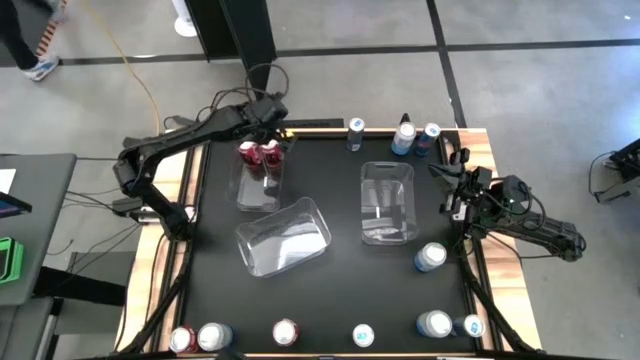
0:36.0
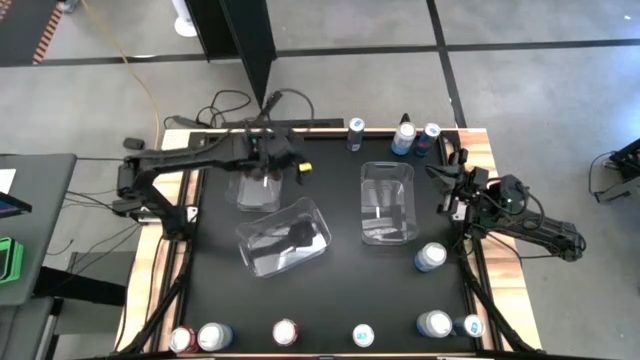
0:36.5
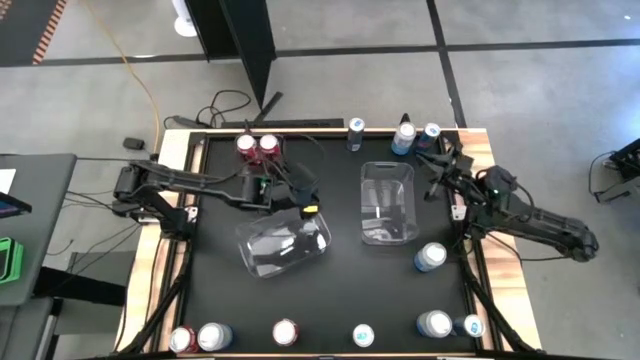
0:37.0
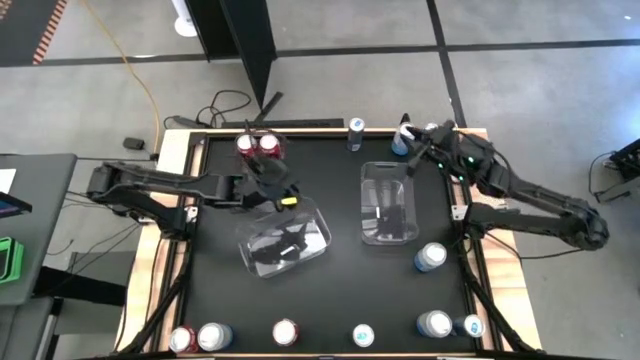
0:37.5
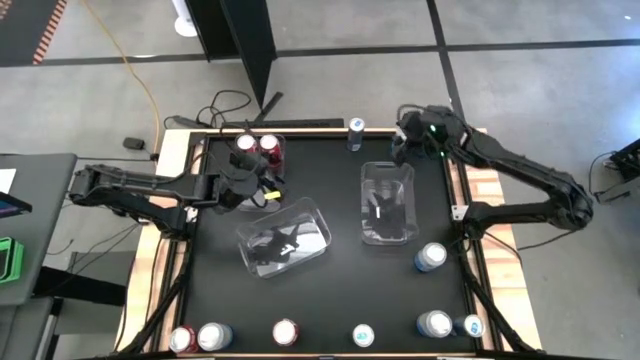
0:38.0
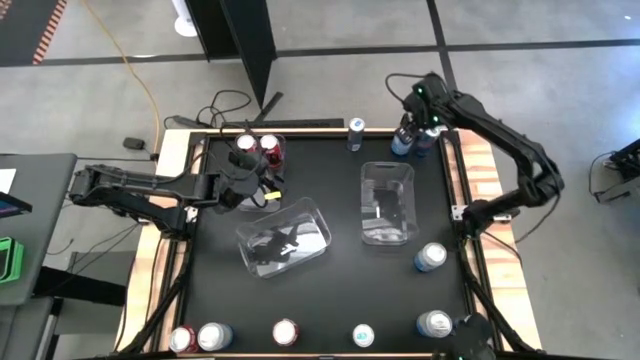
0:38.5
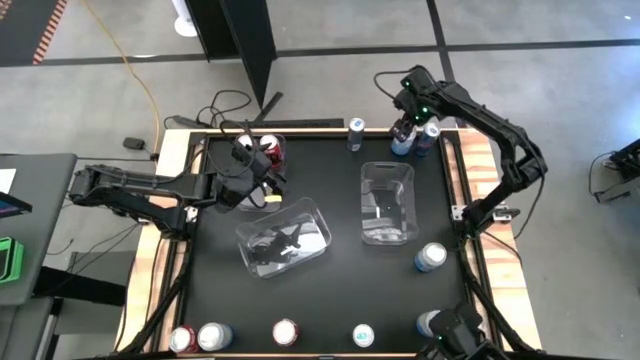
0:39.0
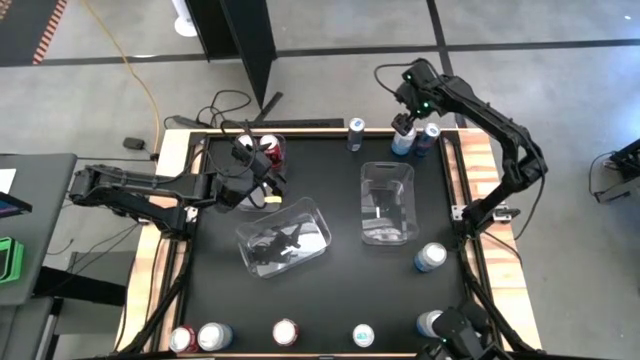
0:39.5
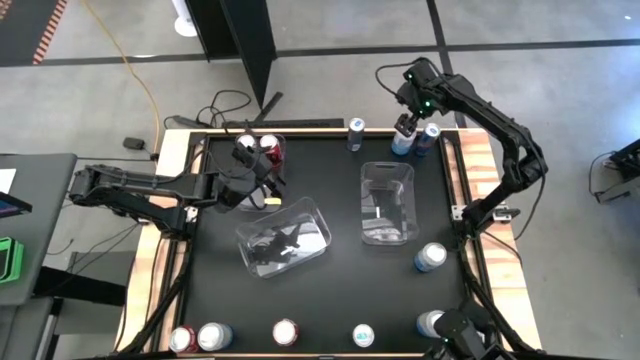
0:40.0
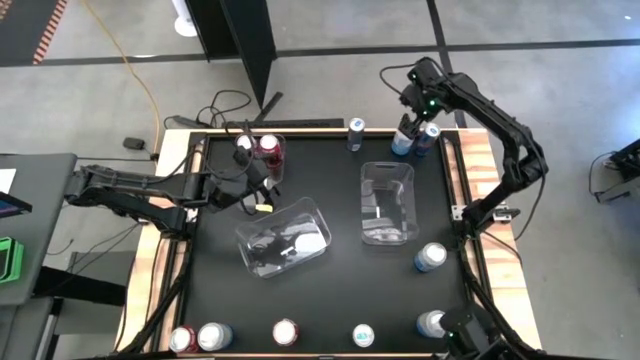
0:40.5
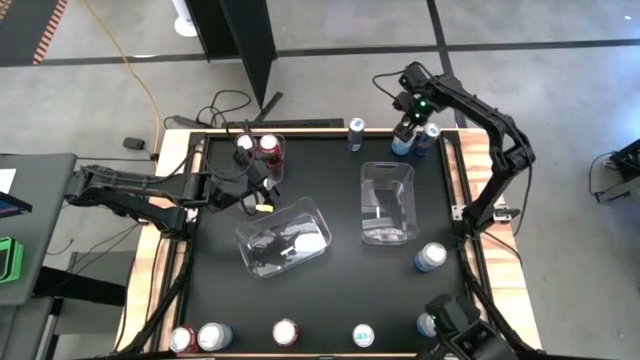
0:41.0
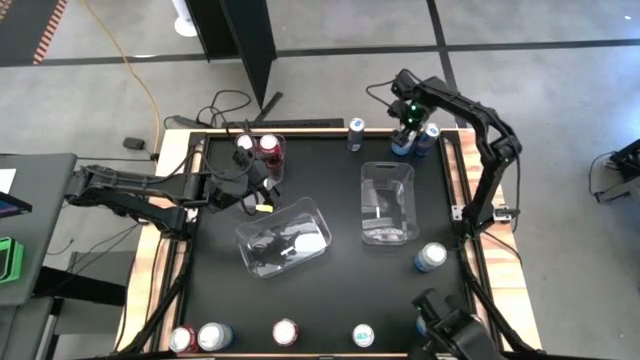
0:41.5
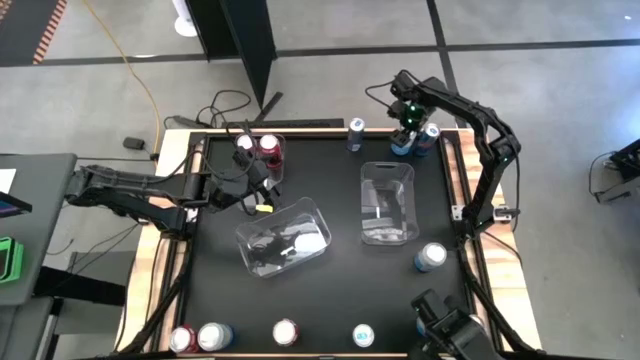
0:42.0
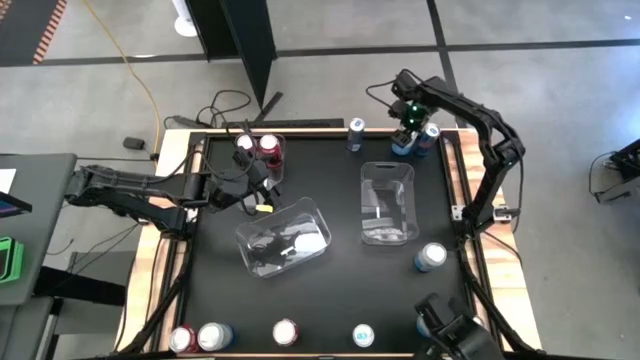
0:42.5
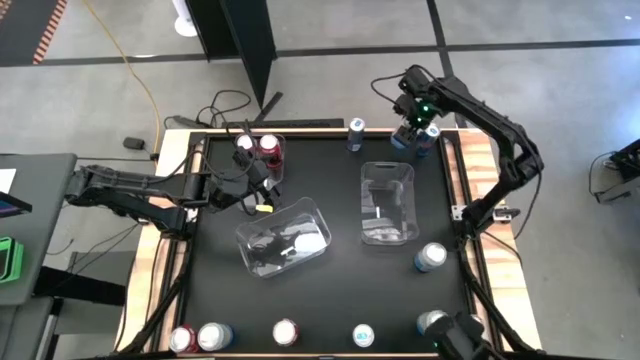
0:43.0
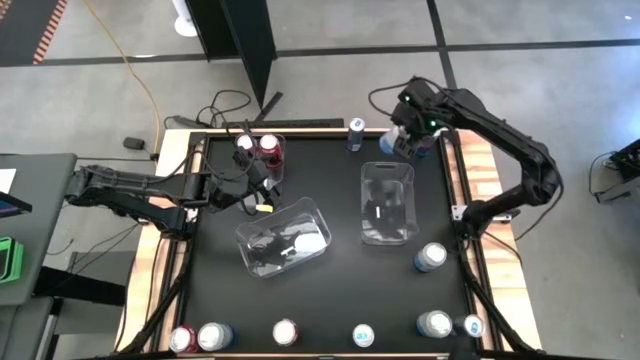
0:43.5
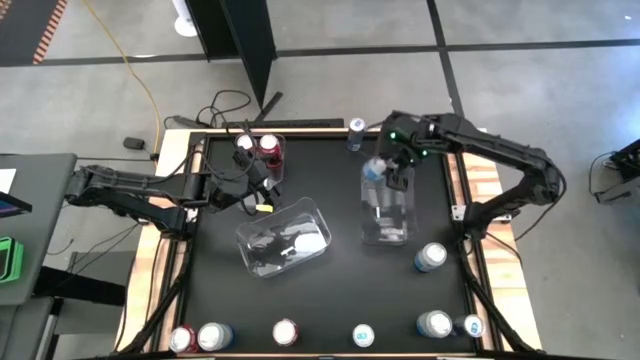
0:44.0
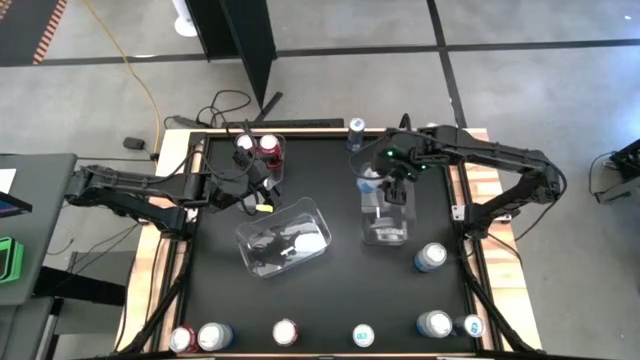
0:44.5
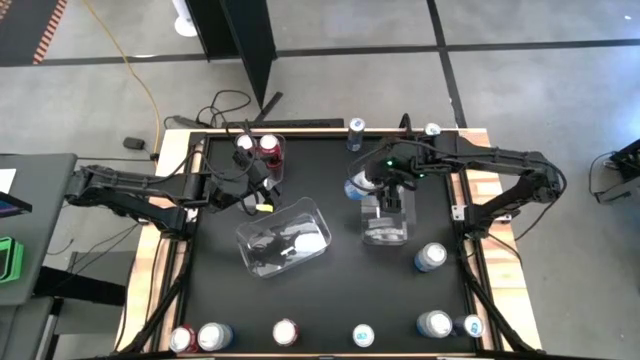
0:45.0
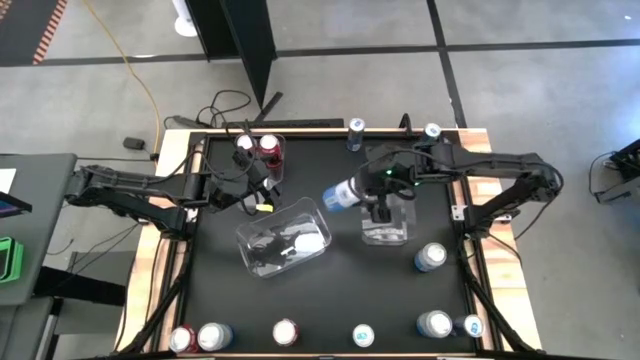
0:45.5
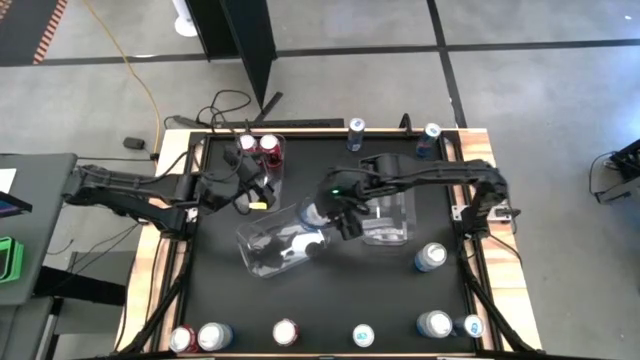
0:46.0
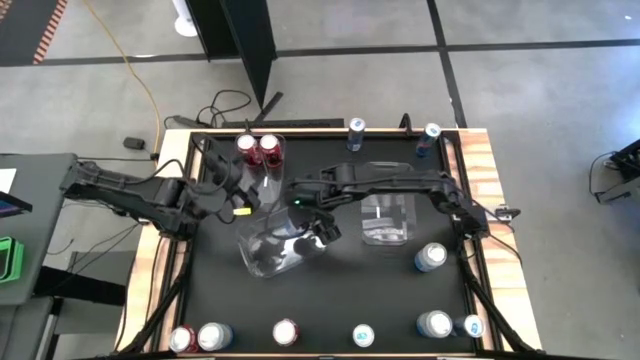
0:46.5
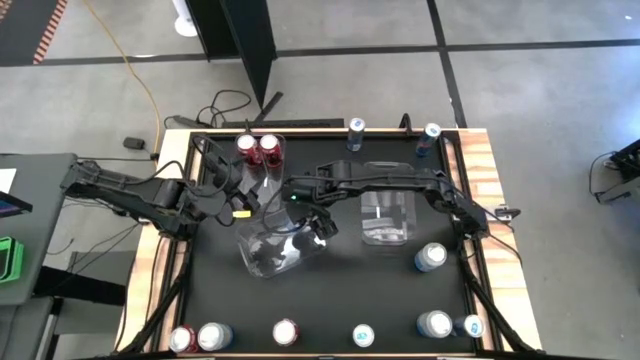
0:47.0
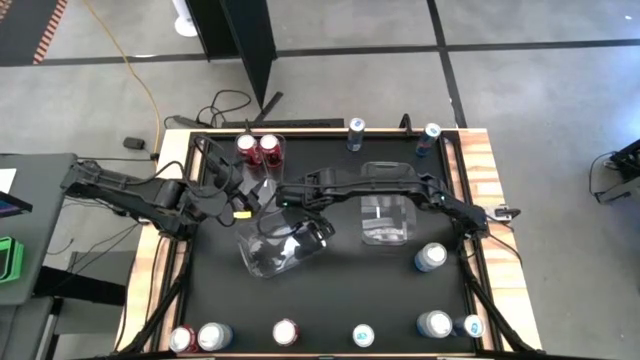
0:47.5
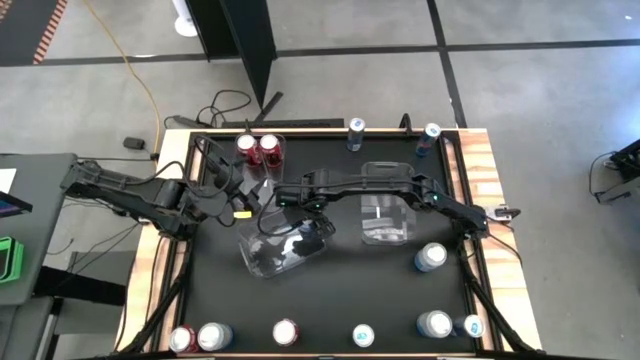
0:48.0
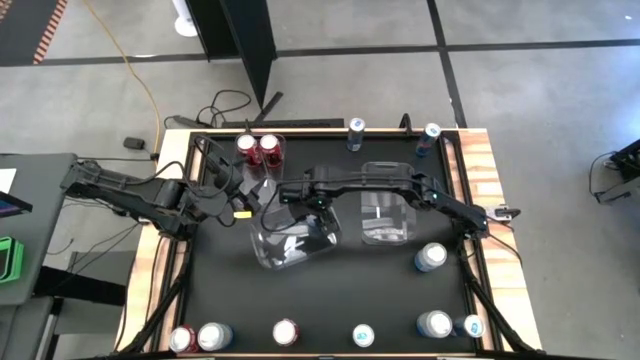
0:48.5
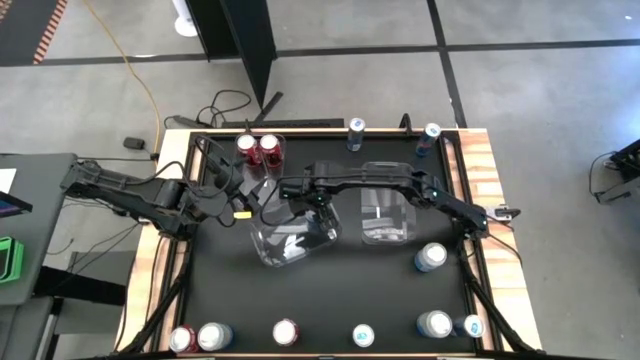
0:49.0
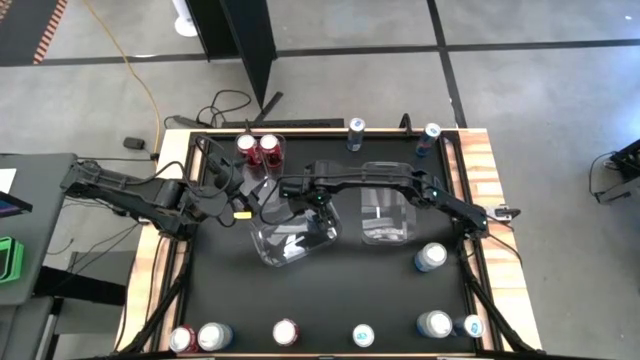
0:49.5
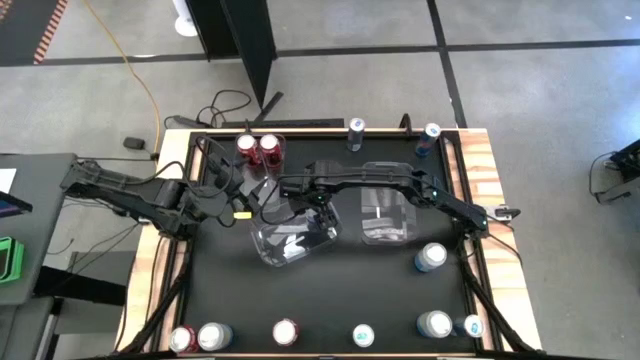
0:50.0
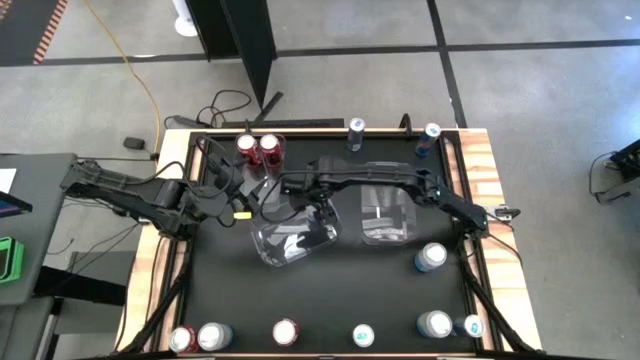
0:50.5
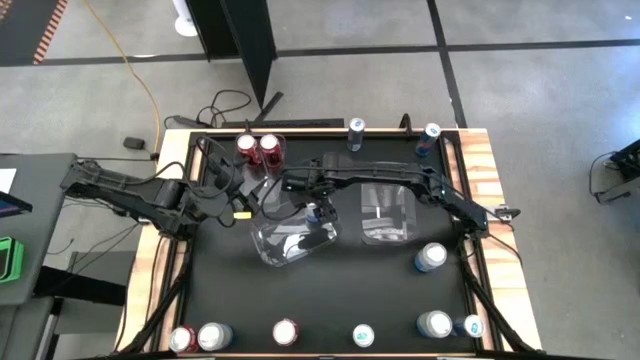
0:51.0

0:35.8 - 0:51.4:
Task: Sort soda cans
Put the top white blue soda can into the middle transparent bin

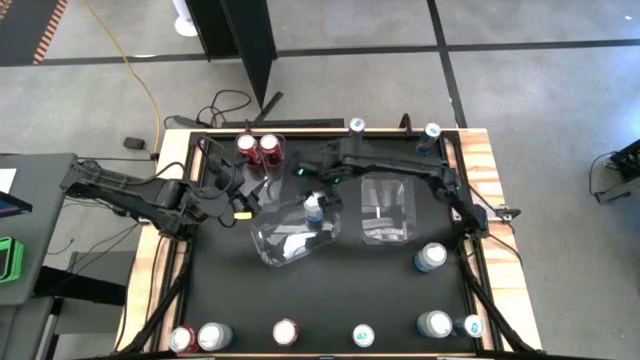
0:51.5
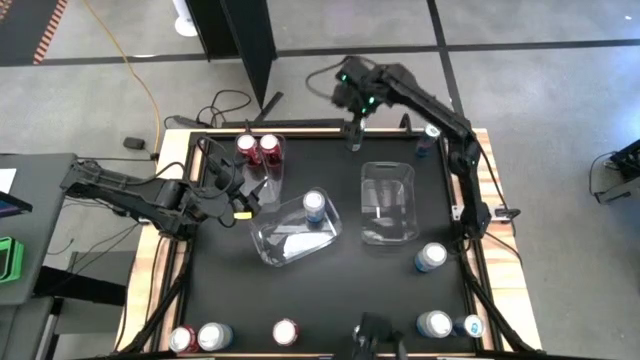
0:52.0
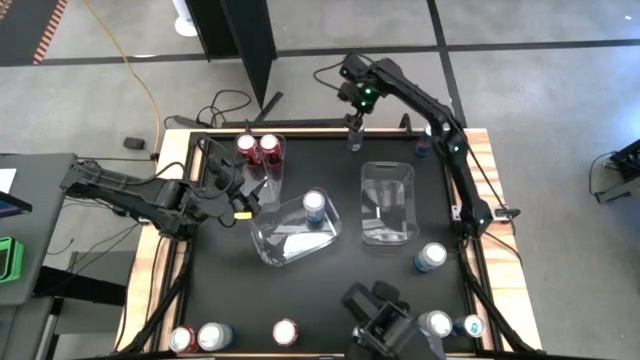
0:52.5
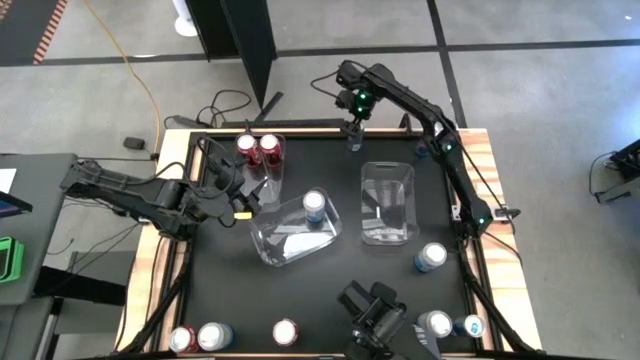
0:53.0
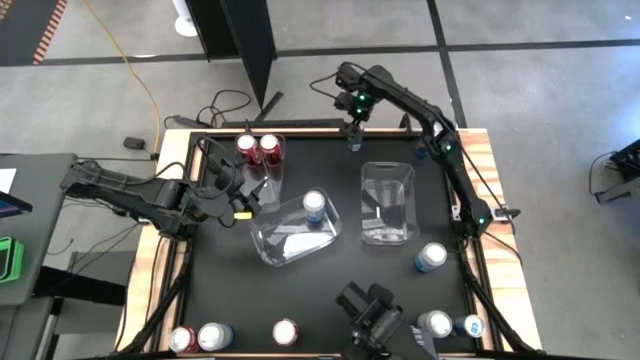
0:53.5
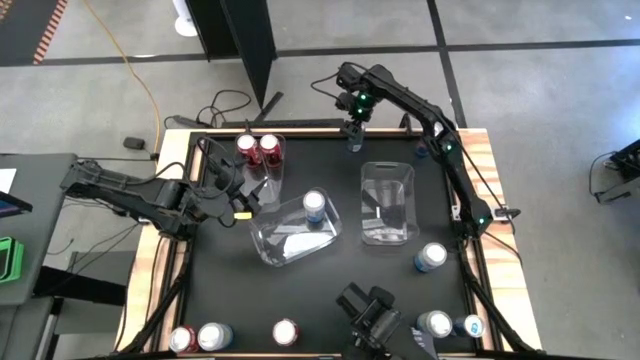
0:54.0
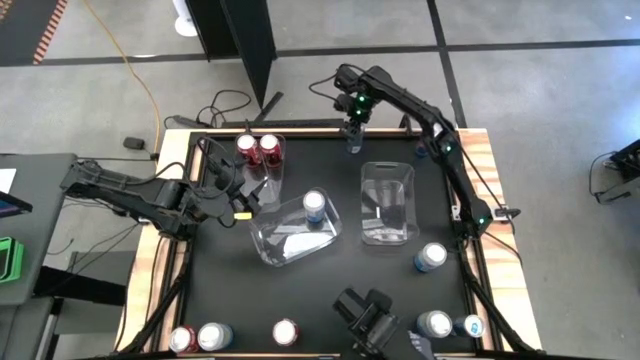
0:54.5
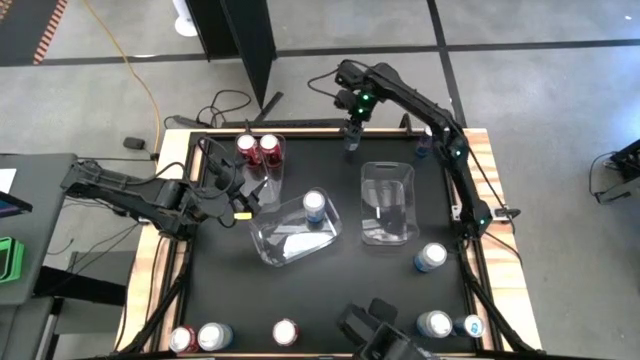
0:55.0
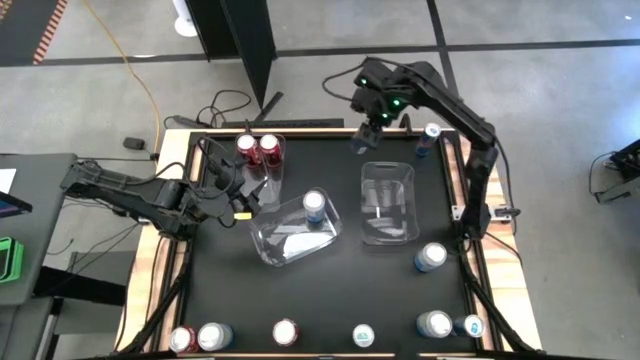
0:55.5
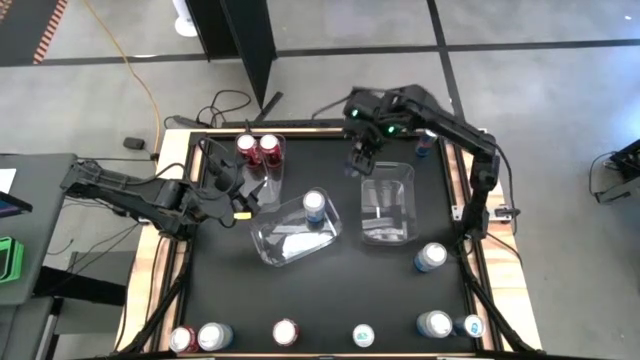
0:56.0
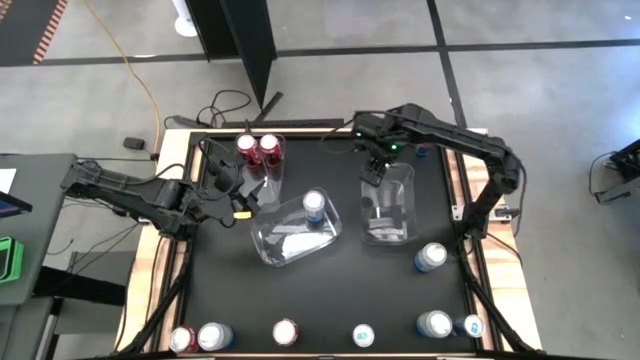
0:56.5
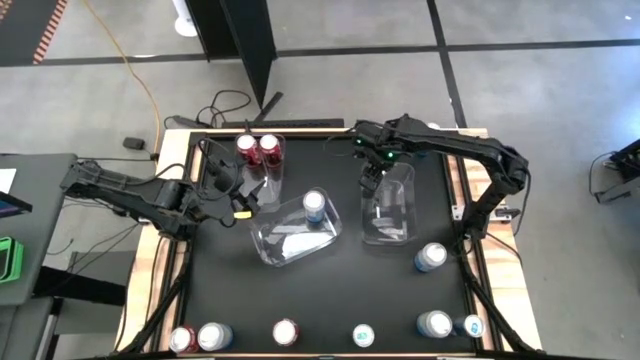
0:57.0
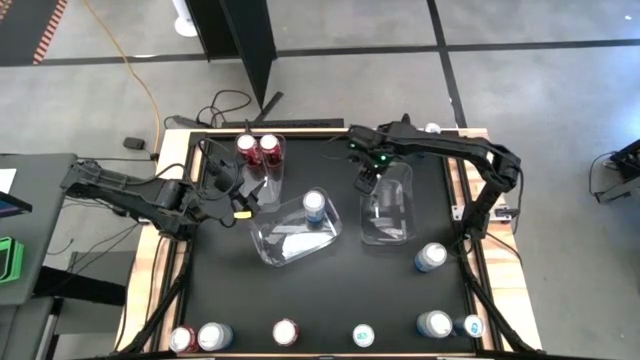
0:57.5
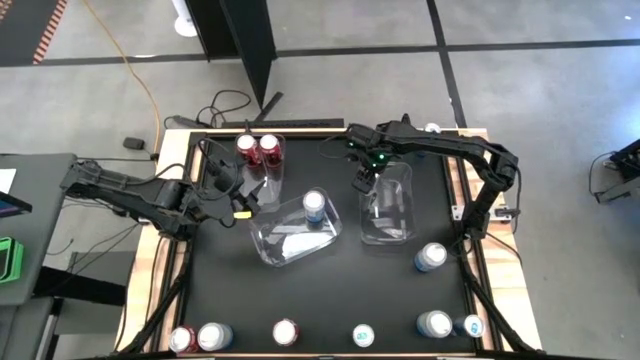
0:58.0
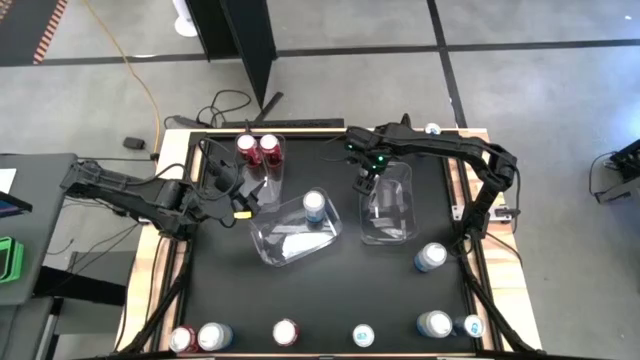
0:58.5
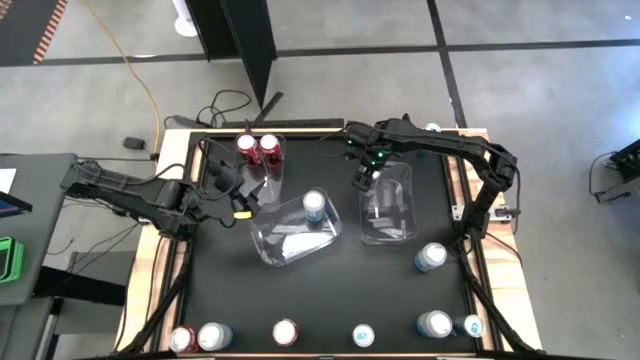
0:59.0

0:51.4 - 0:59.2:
Put the top left blue soda can into the right transparent bin
